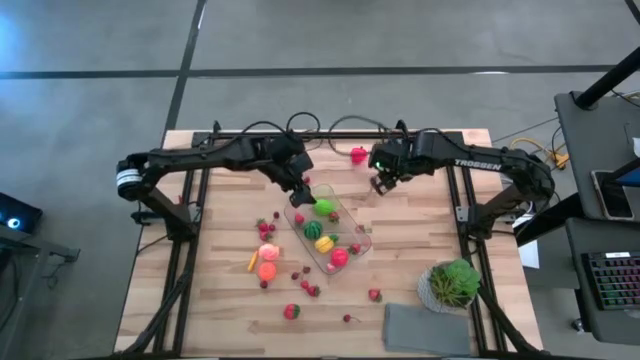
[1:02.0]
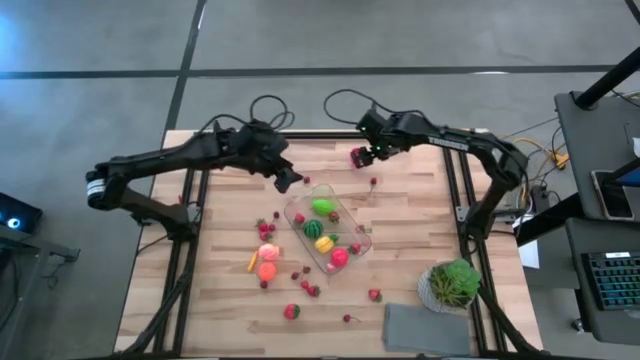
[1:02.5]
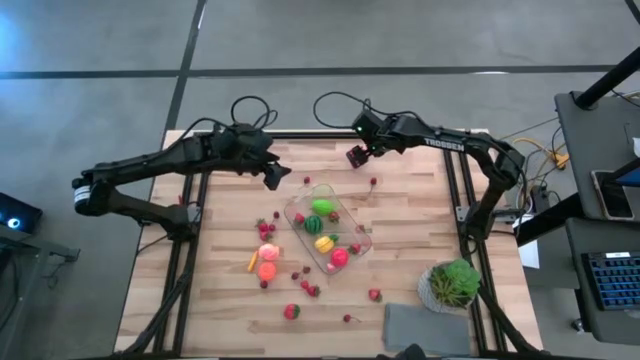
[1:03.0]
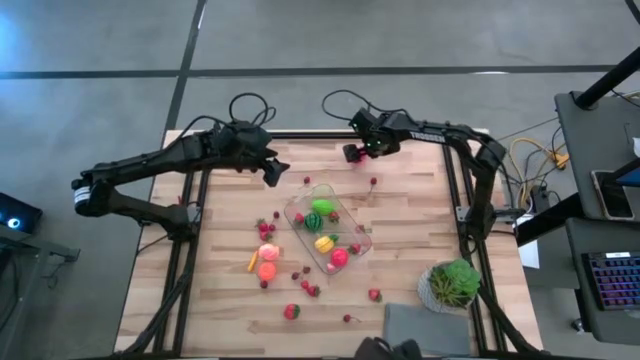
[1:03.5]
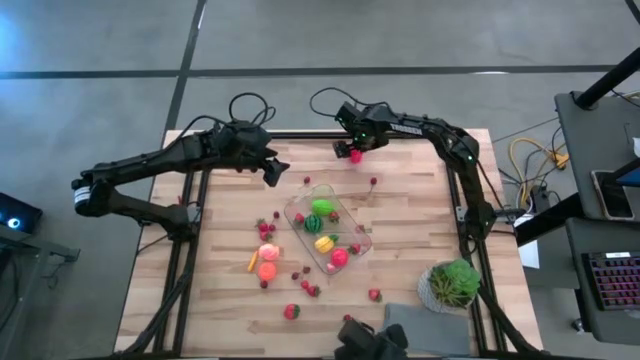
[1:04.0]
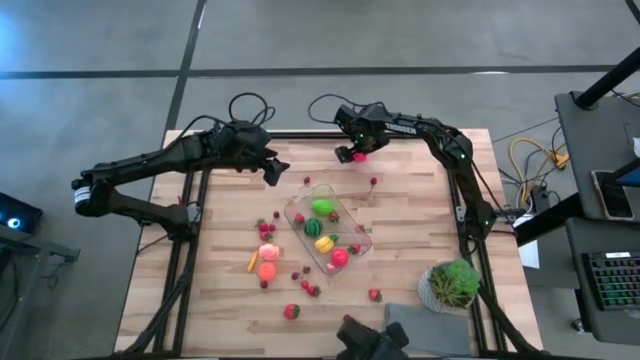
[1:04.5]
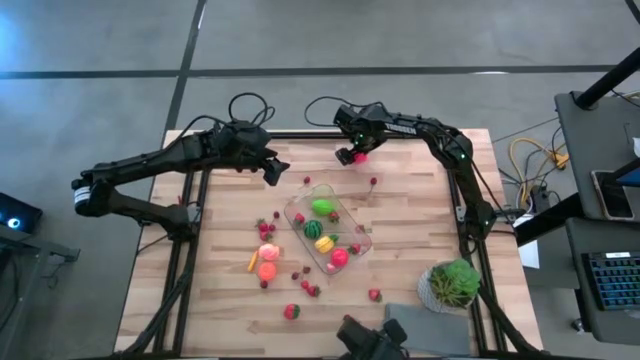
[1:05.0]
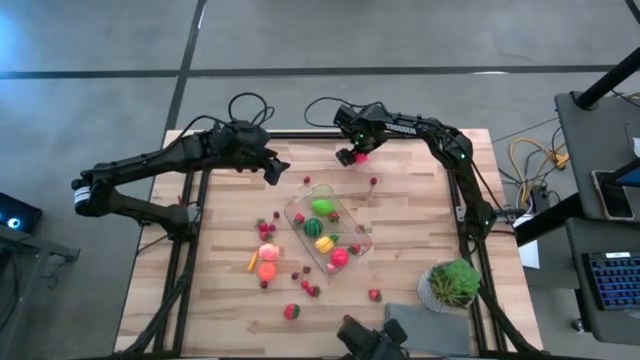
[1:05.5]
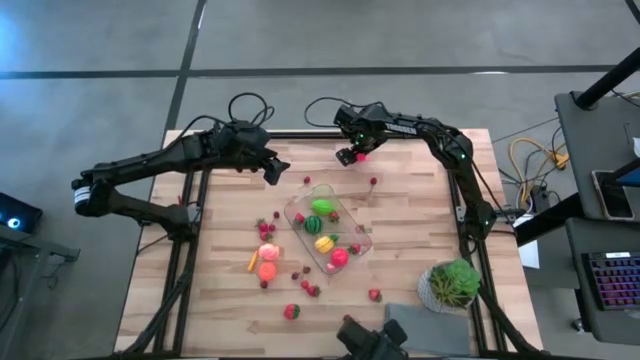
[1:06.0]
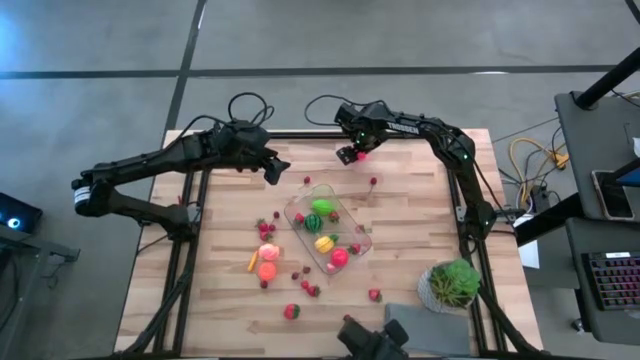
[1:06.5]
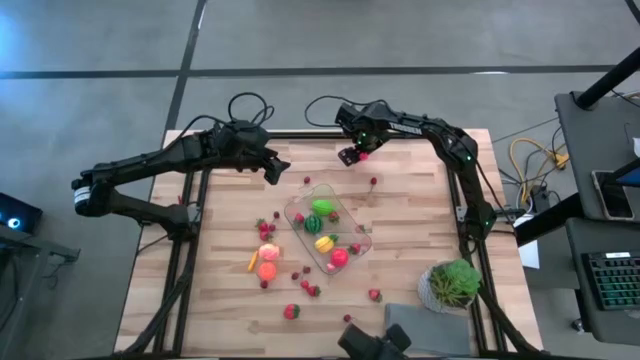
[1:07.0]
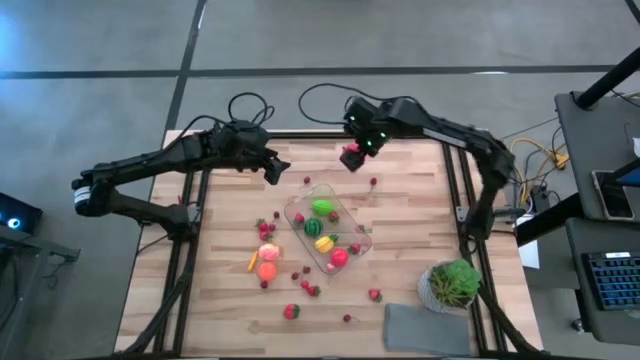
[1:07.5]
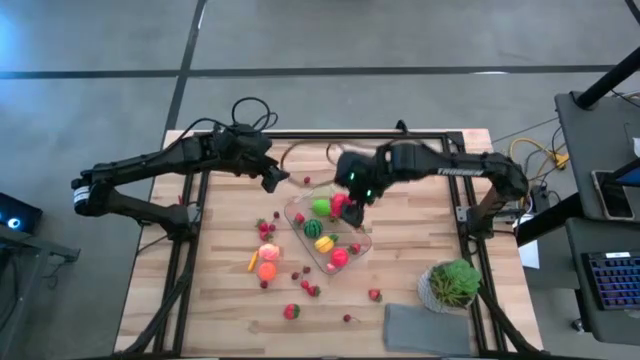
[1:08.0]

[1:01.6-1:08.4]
Task: Pick and placing Produce into tupperware
Put the red apple into the transparent bin

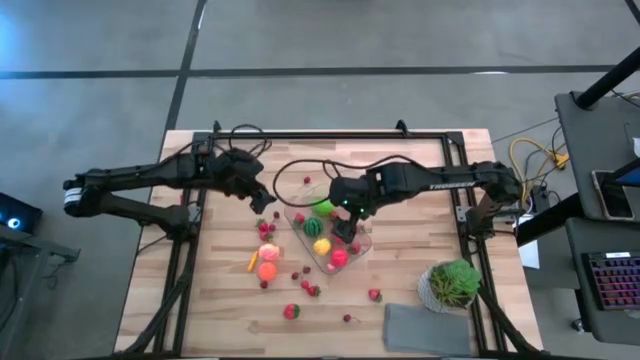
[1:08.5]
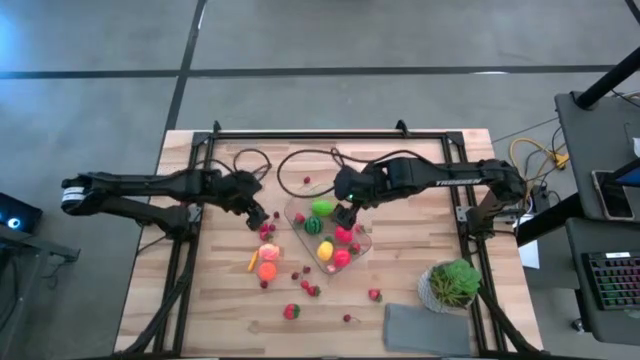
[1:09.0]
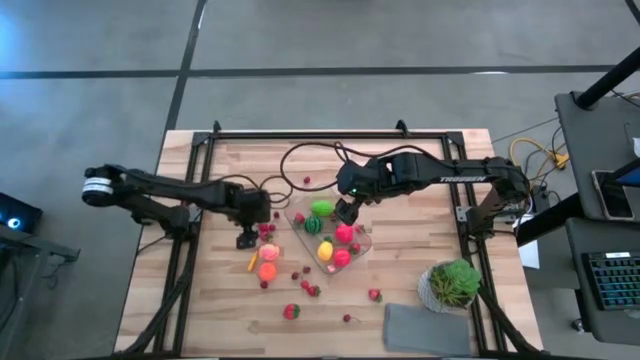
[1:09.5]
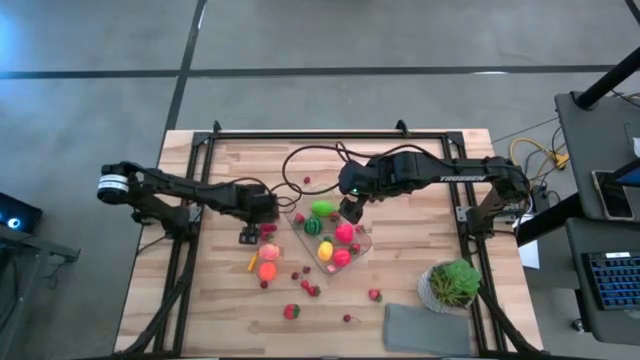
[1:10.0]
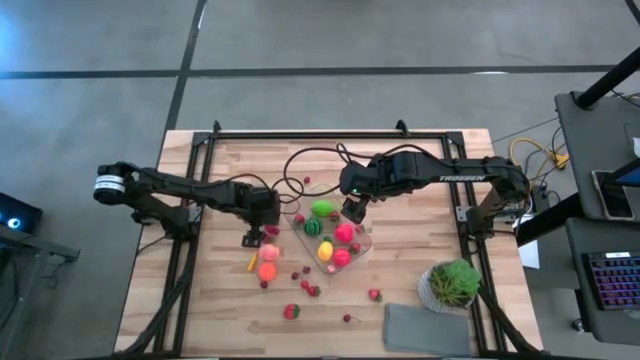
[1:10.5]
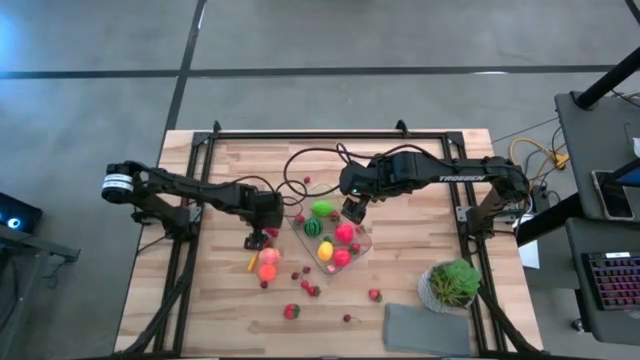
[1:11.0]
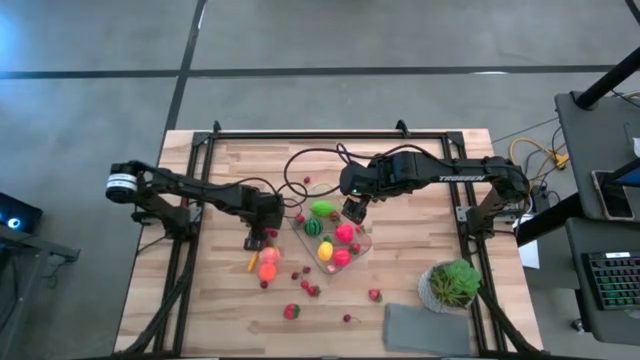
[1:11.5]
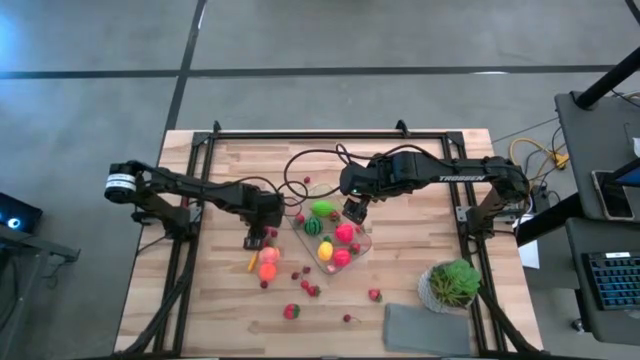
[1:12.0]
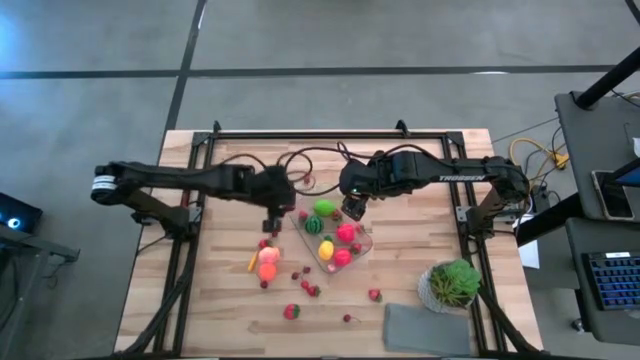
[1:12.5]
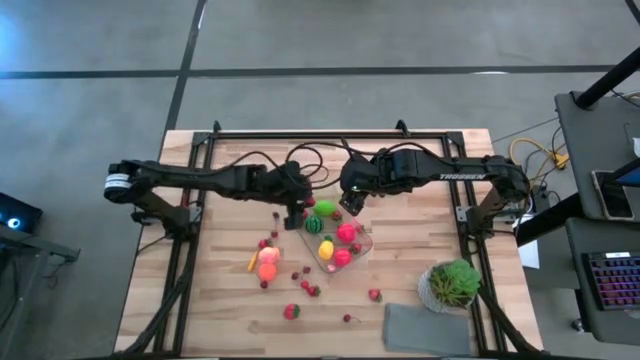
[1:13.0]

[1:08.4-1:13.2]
Put the red strawberry into the transparent bin

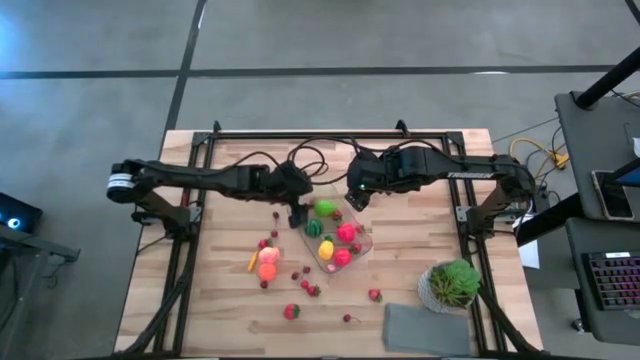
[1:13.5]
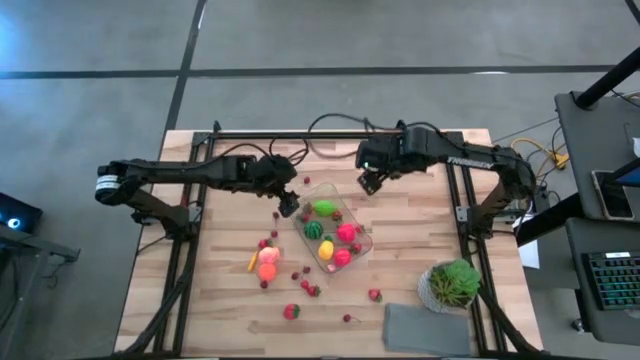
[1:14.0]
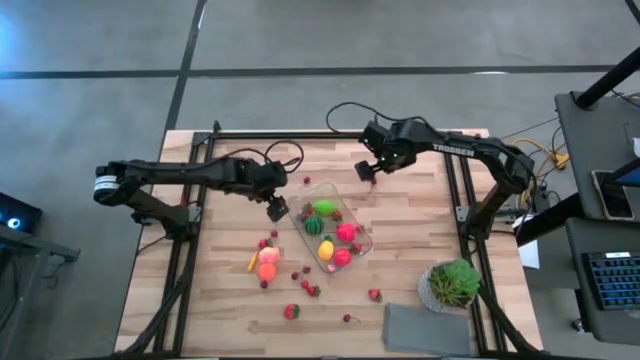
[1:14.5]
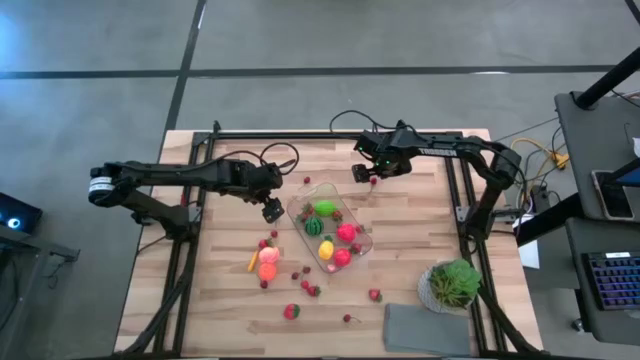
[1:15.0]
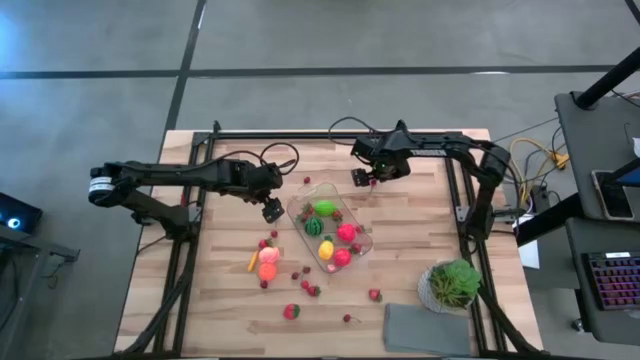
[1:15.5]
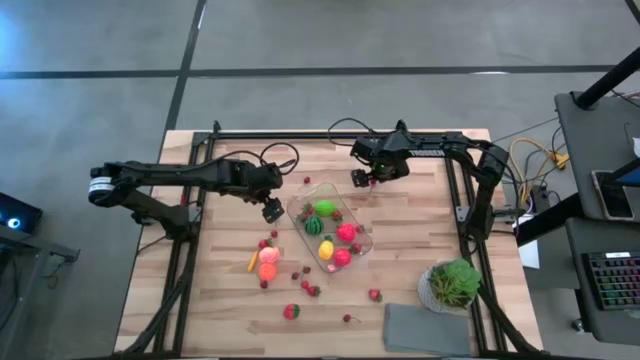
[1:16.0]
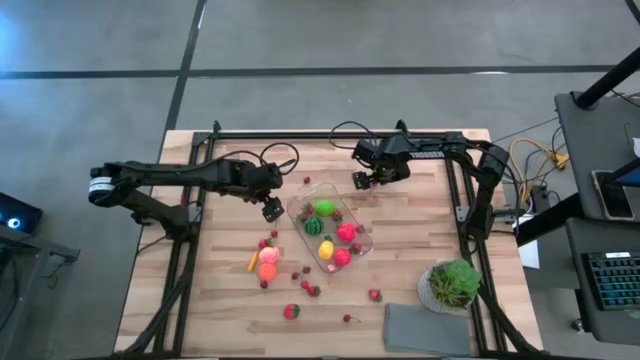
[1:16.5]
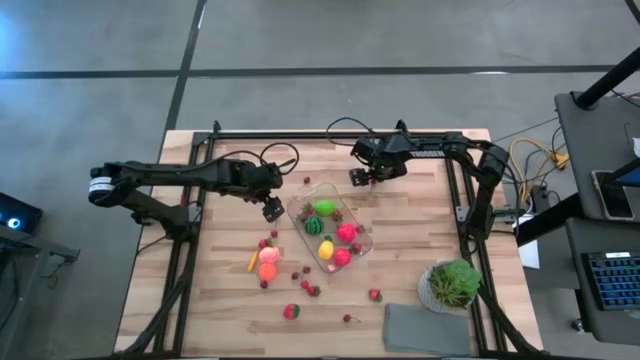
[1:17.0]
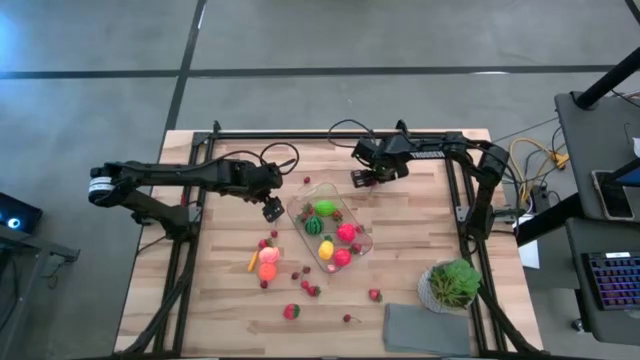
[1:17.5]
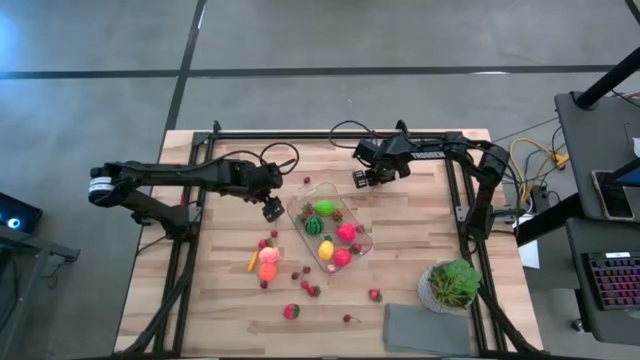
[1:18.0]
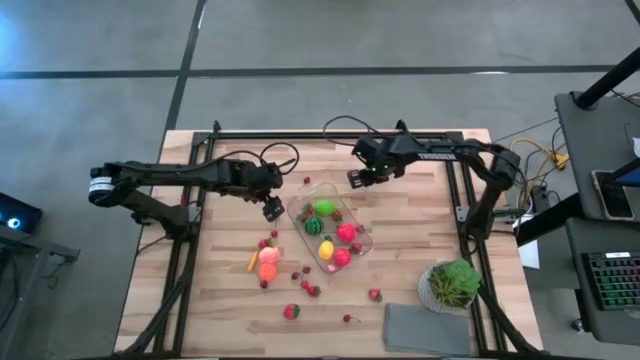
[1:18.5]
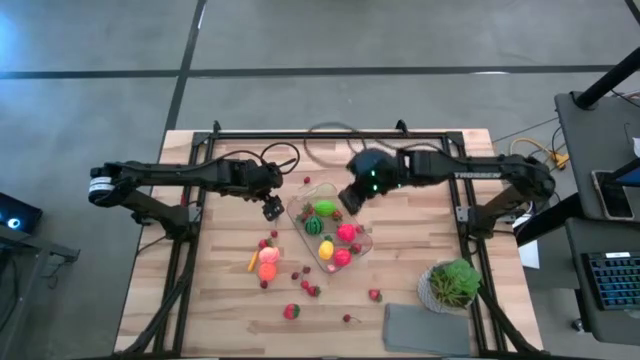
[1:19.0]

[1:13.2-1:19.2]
Put the red cherry into the transparent bin

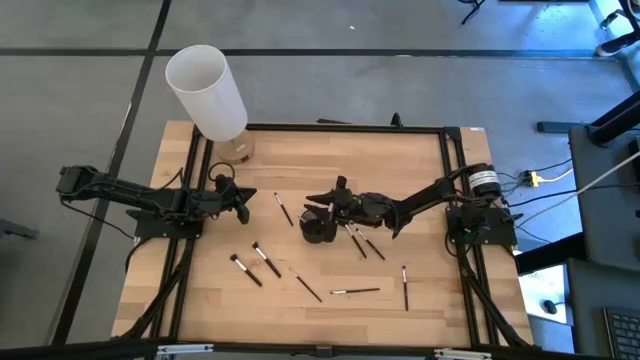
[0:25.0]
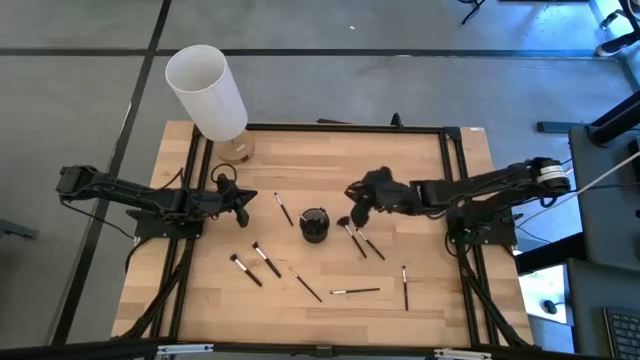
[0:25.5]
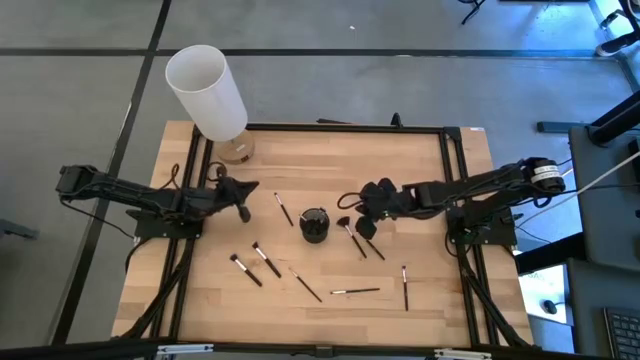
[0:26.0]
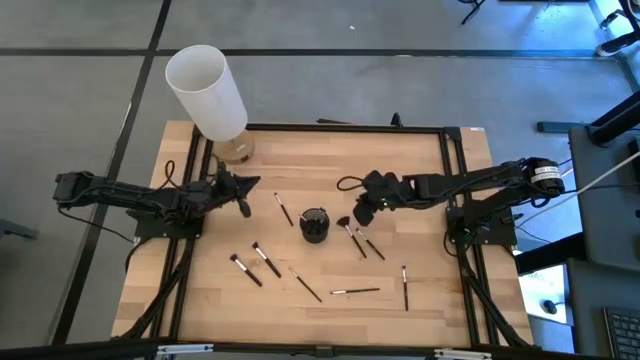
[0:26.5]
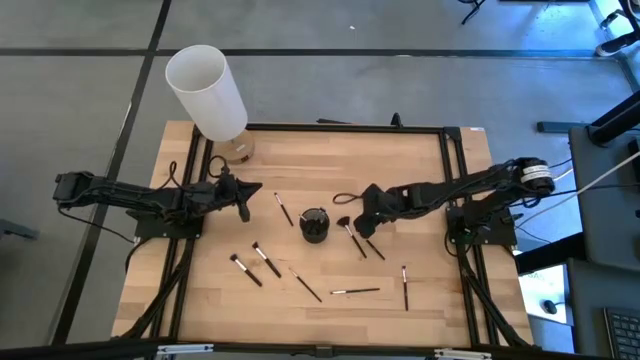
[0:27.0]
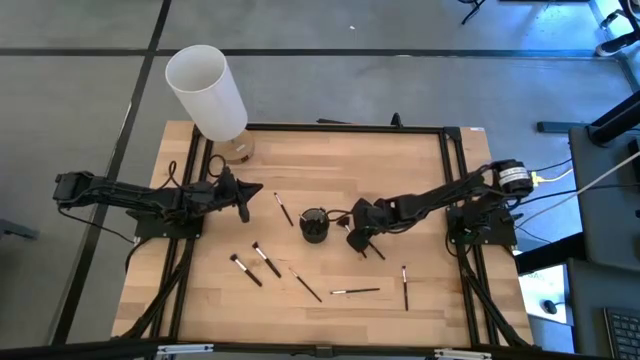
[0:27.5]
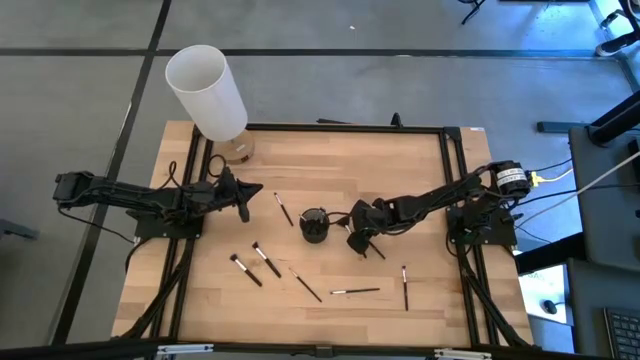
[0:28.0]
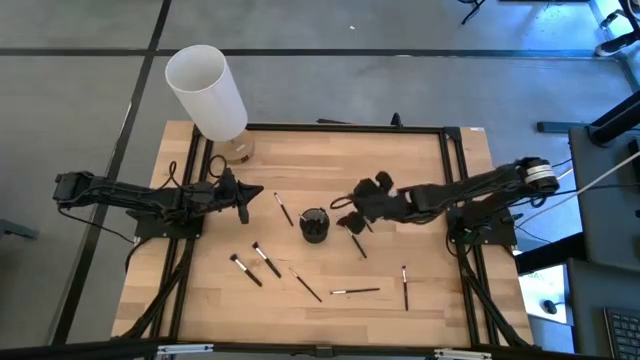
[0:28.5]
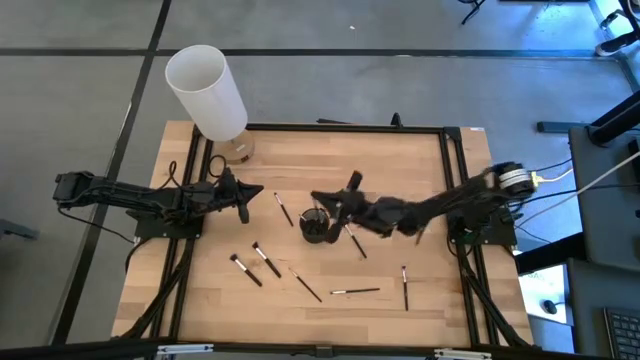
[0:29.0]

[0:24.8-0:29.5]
Task: Sort items
Put the silver eyeshadow brush into the pen holder
